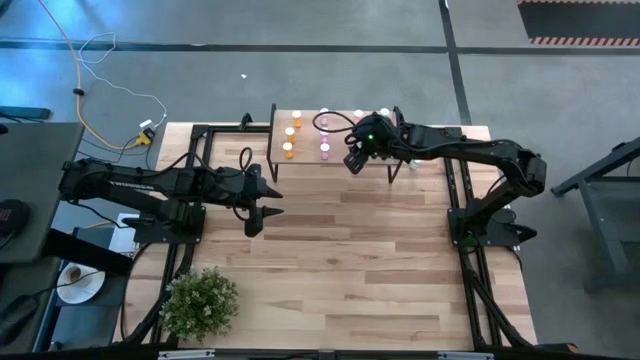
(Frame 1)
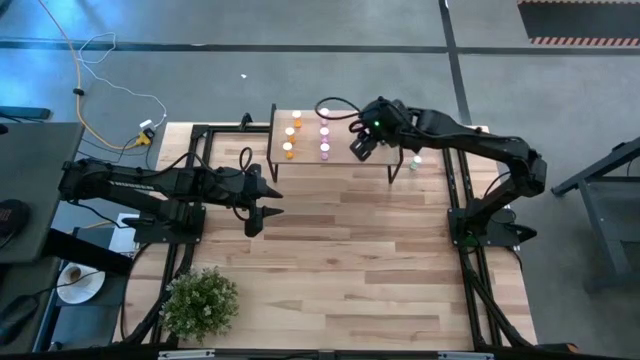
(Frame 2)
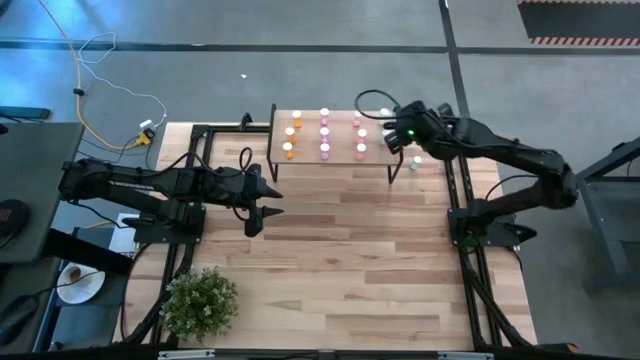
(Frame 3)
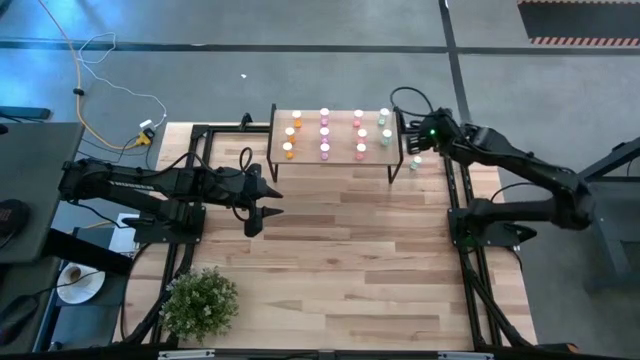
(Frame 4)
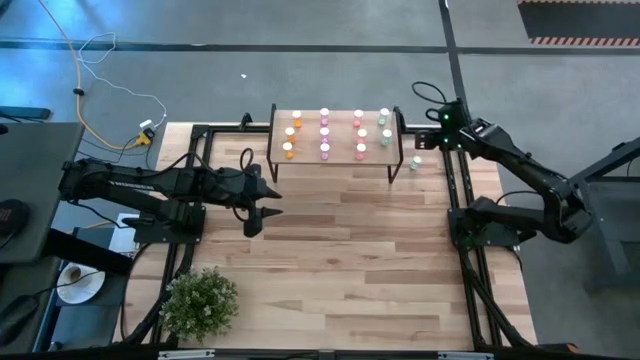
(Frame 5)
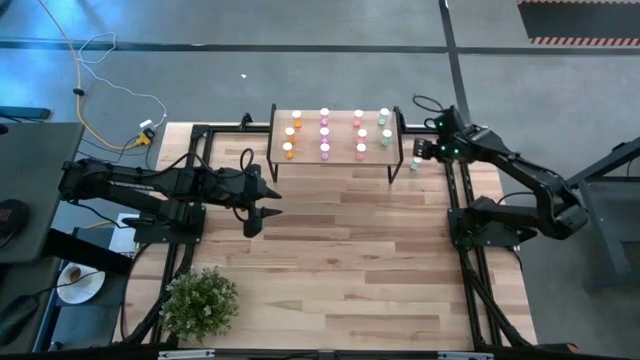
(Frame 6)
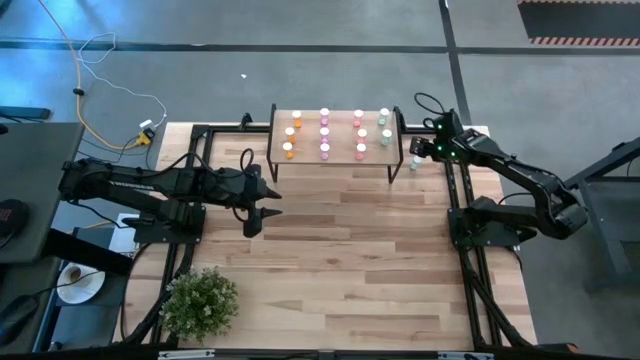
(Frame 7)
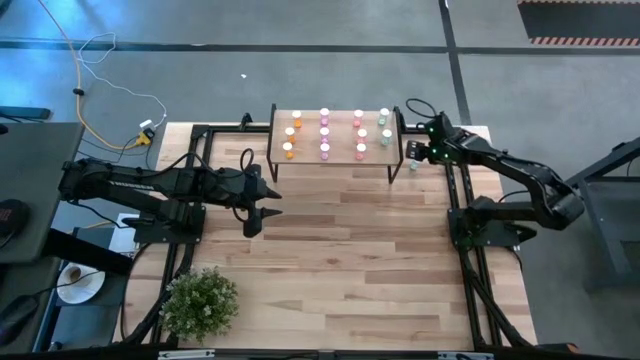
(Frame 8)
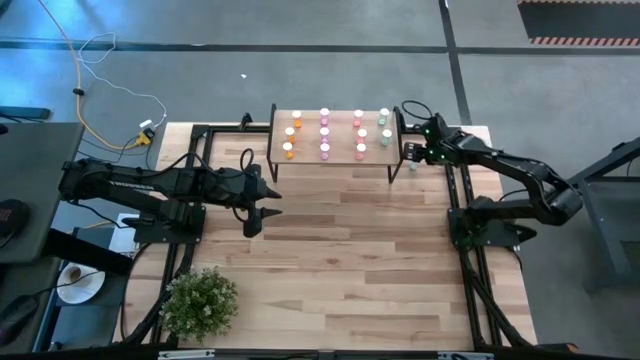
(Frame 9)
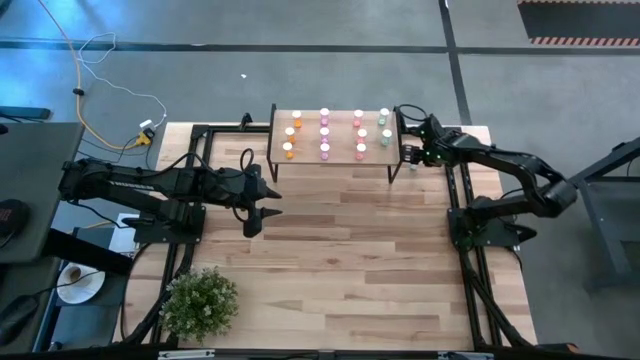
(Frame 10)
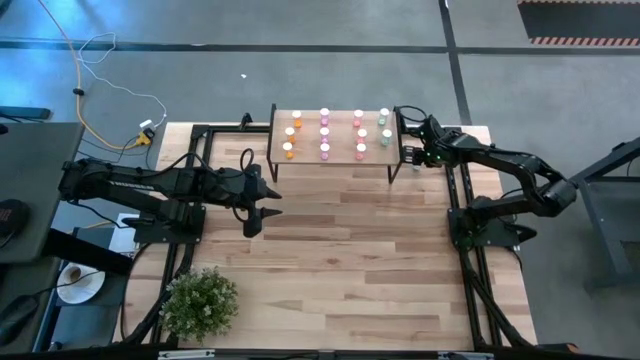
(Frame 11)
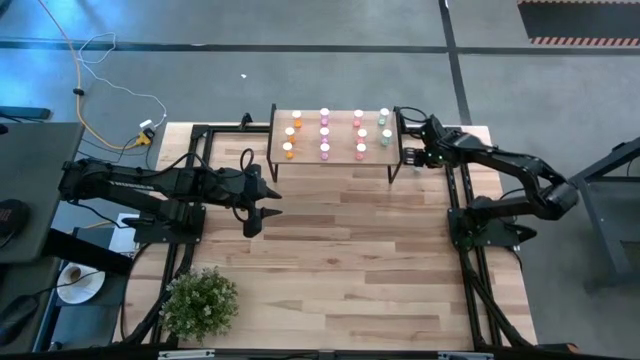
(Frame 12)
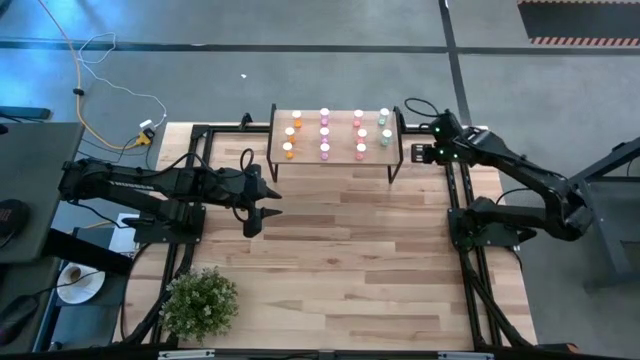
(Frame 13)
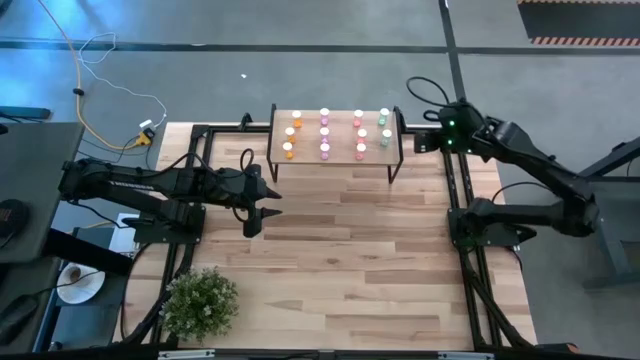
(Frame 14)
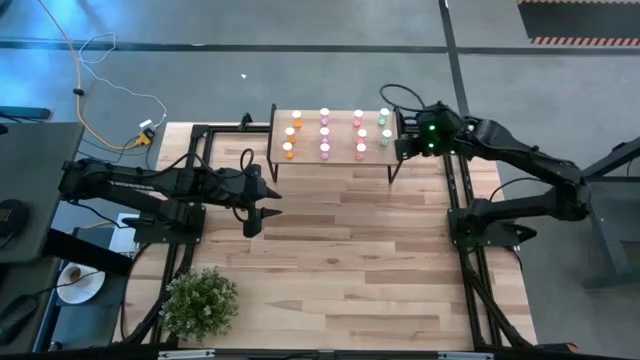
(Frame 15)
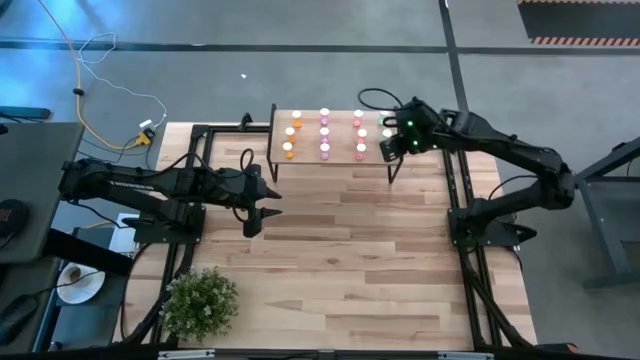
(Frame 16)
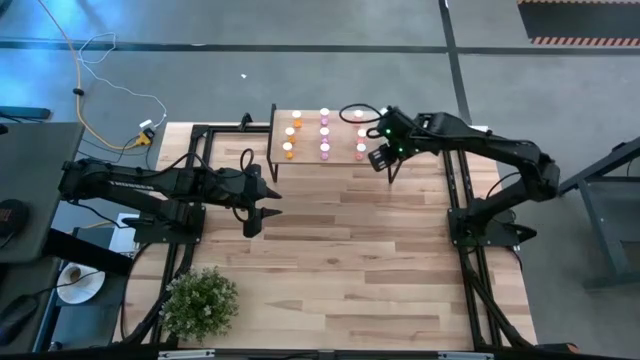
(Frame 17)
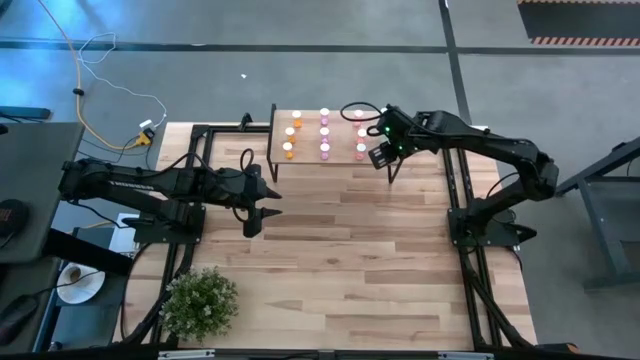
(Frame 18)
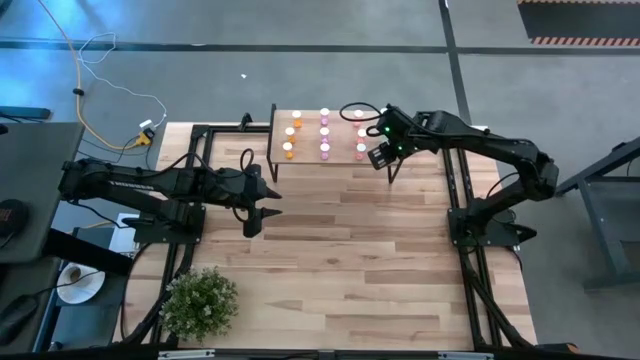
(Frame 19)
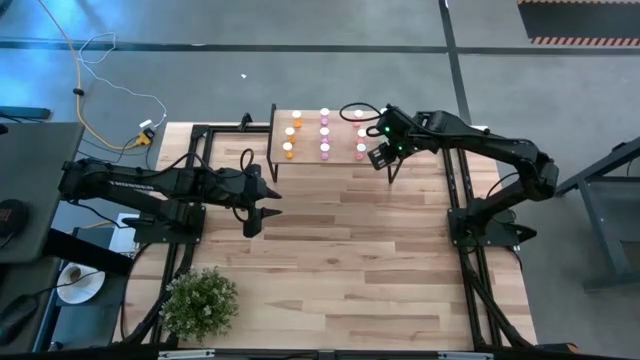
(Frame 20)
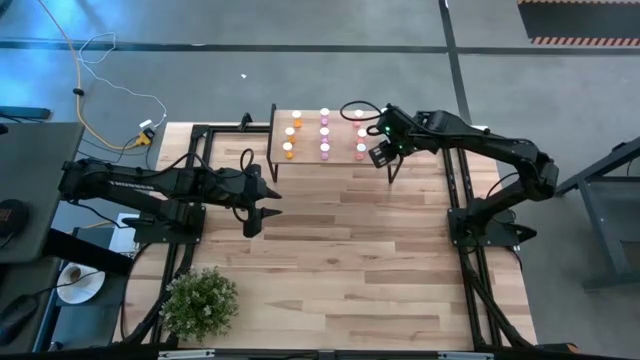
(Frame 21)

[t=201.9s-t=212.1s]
Task: Pick and place medicine bottles onto shelf by color
Put the blue pill bottle on the shelf aligned with the other blue pill bottles

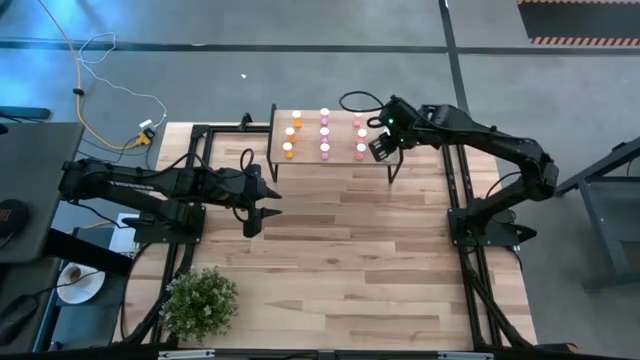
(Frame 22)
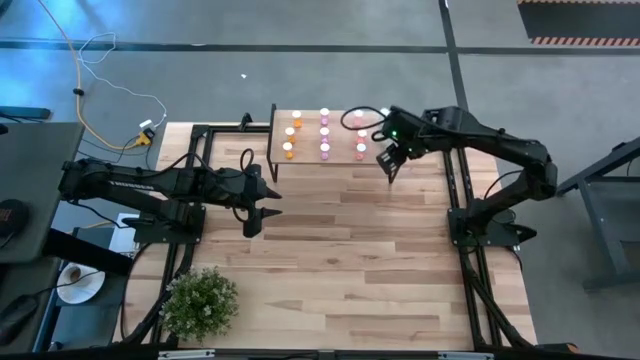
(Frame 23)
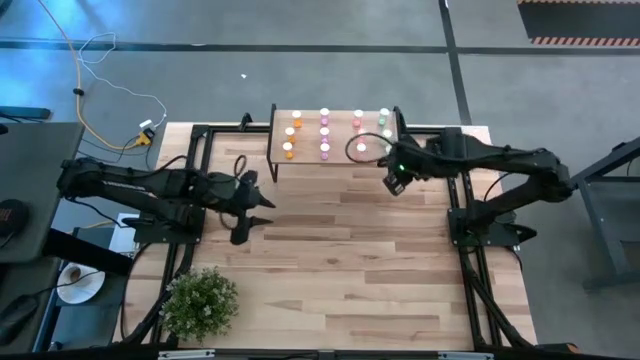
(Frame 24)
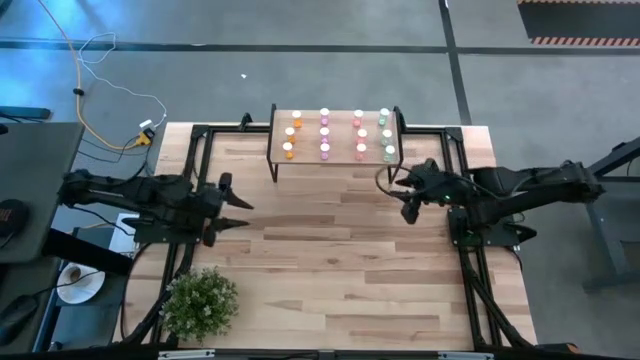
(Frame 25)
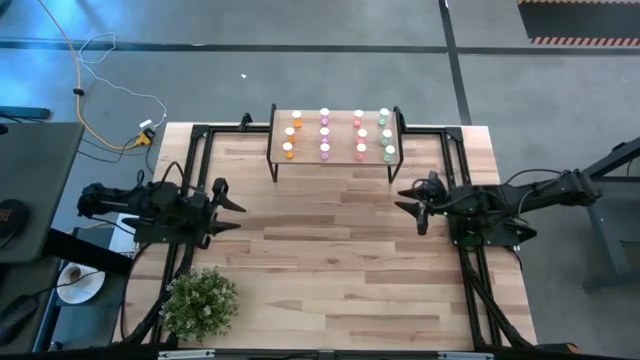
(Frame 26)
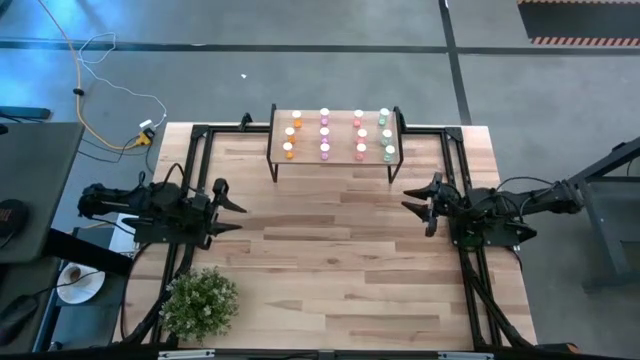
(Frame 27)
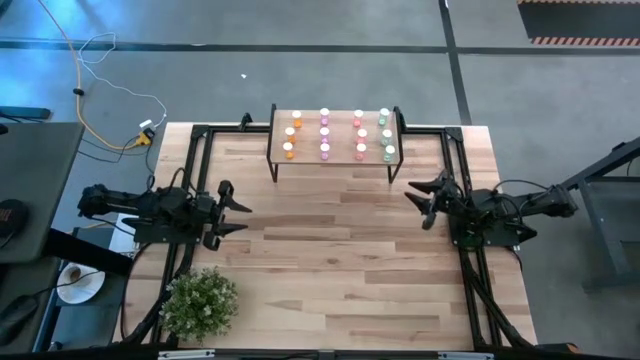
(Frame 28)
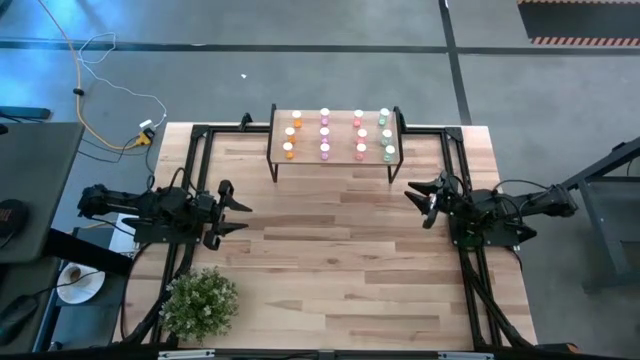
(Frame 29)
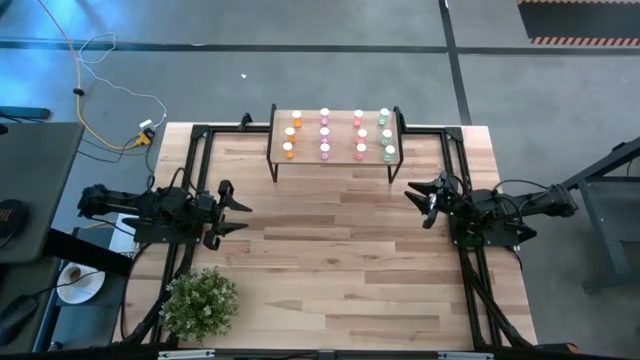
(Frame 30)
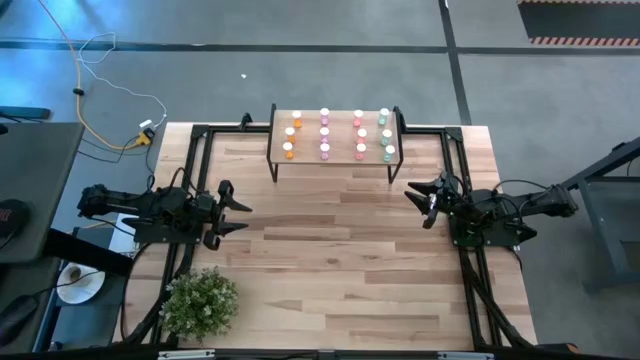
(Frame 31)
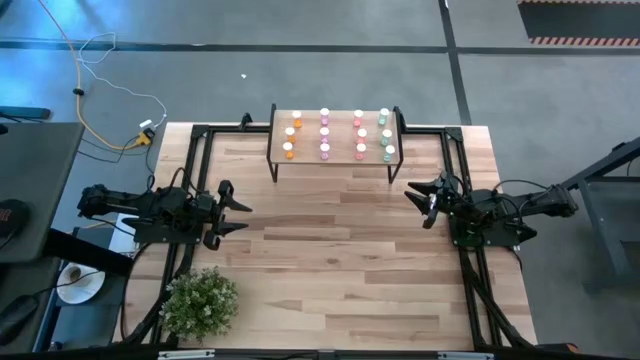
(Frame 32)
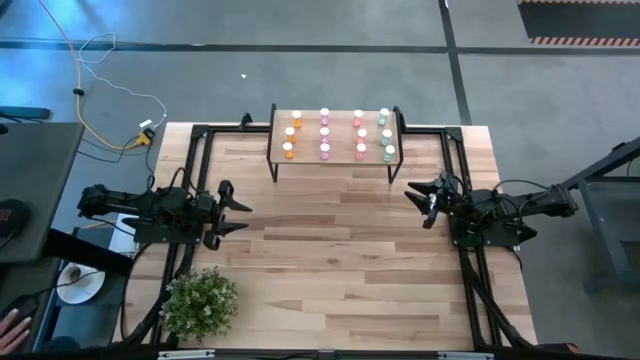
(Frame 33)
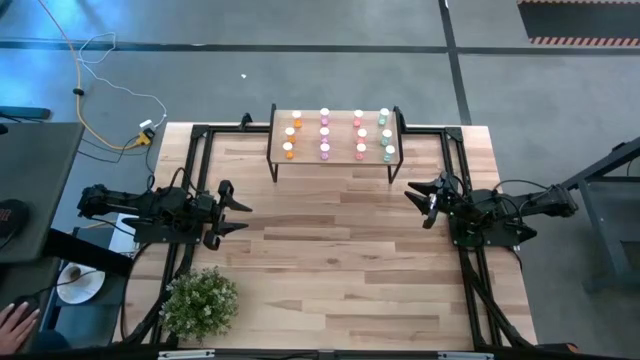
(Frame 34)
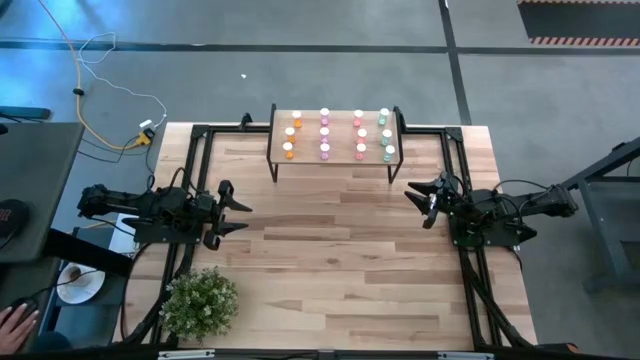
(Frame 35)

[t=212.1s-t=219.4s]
Return to Home Position
